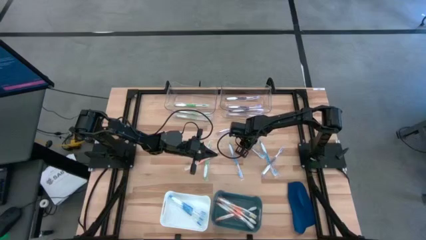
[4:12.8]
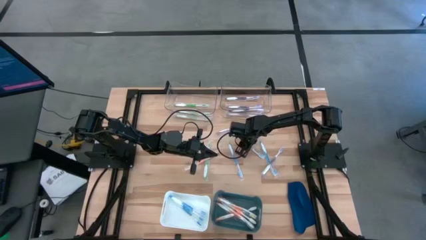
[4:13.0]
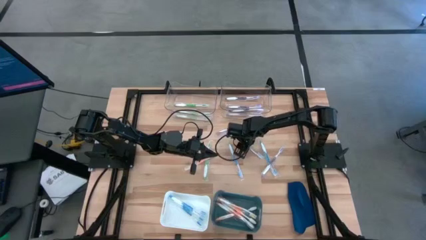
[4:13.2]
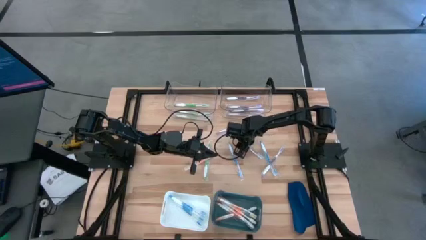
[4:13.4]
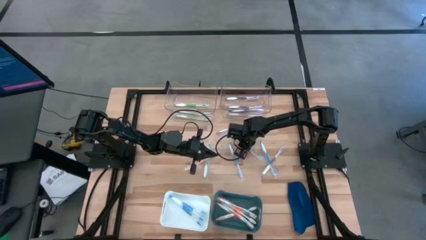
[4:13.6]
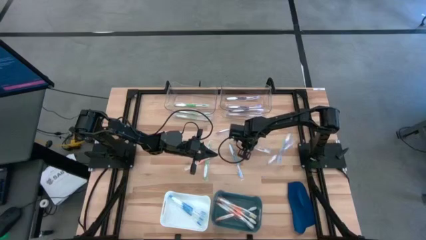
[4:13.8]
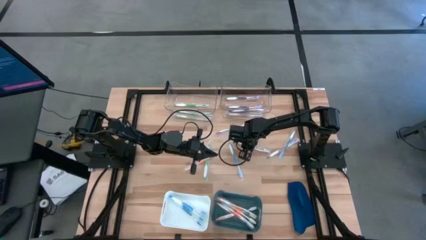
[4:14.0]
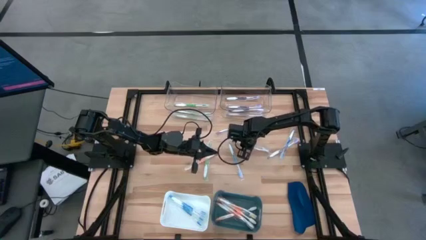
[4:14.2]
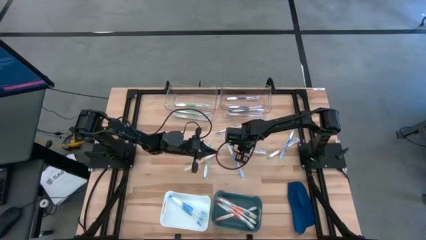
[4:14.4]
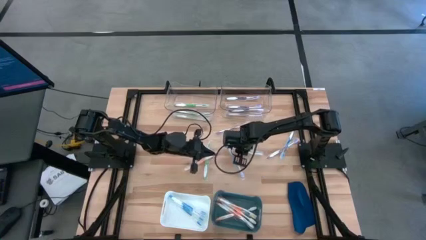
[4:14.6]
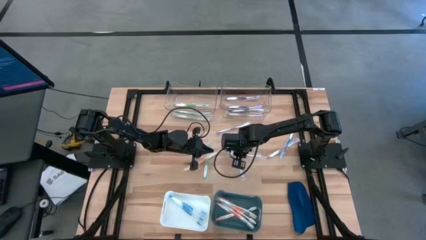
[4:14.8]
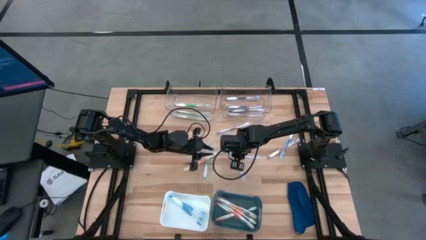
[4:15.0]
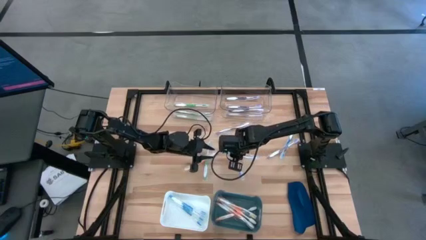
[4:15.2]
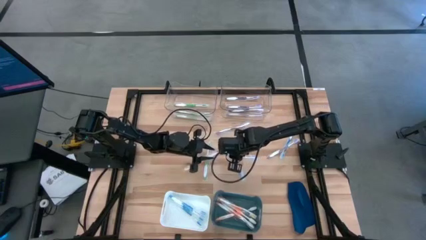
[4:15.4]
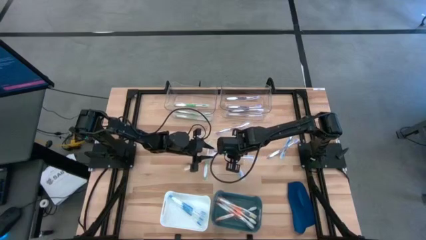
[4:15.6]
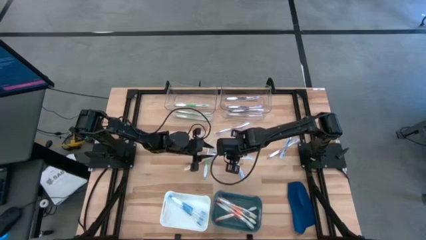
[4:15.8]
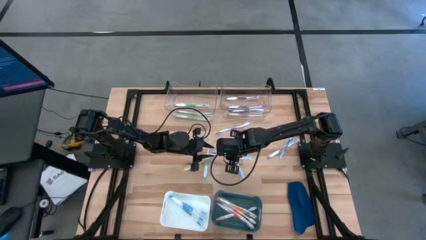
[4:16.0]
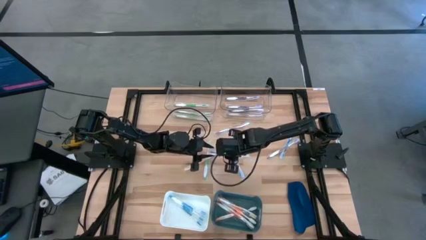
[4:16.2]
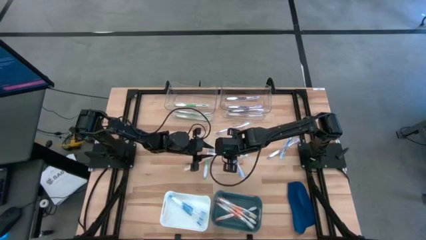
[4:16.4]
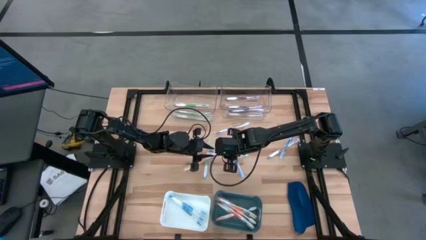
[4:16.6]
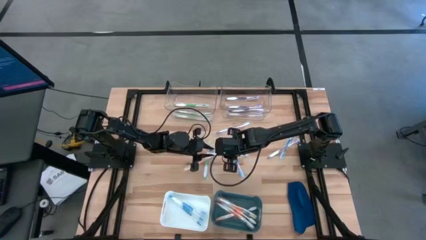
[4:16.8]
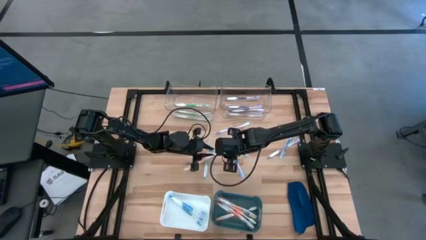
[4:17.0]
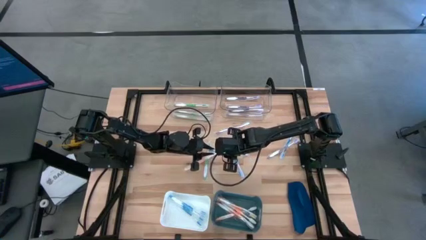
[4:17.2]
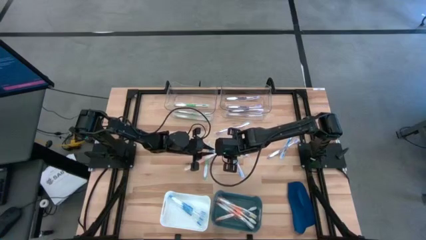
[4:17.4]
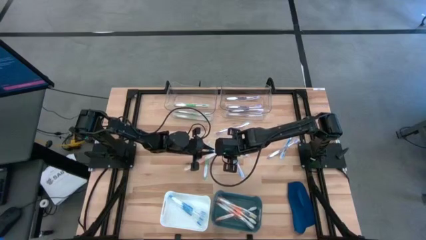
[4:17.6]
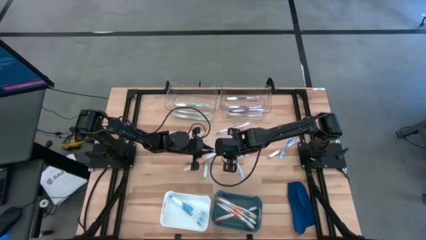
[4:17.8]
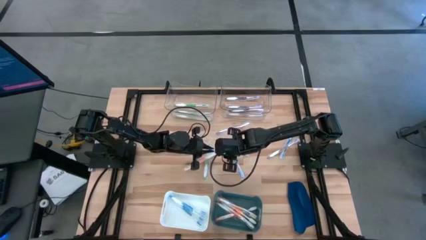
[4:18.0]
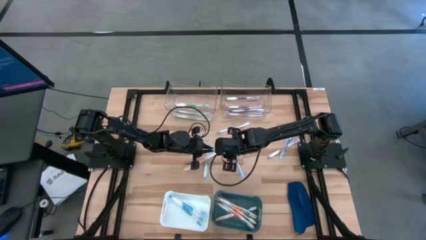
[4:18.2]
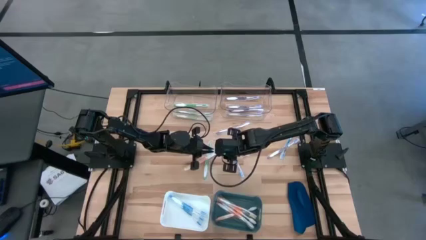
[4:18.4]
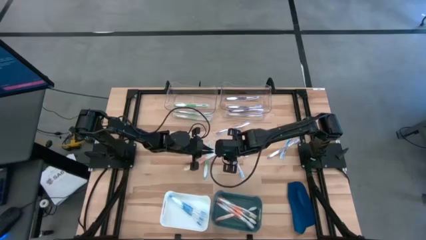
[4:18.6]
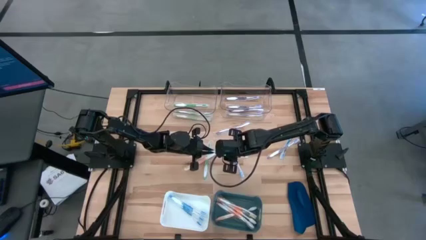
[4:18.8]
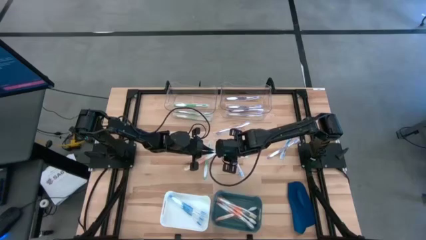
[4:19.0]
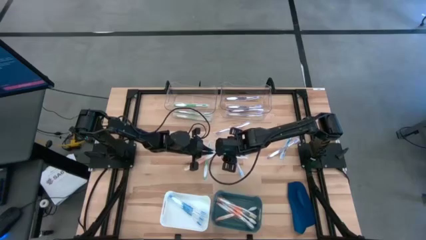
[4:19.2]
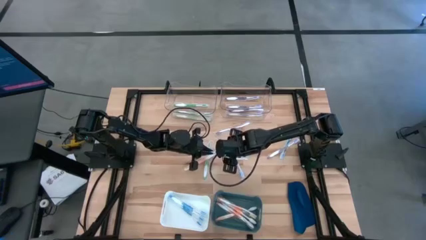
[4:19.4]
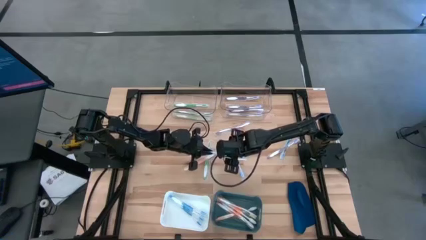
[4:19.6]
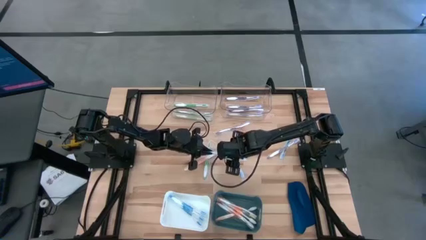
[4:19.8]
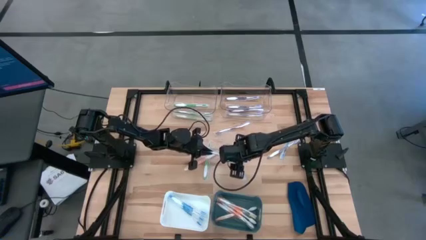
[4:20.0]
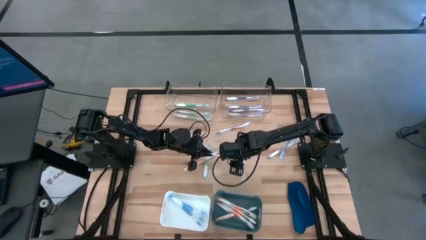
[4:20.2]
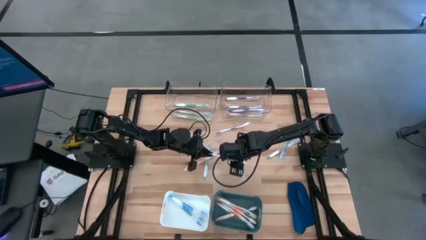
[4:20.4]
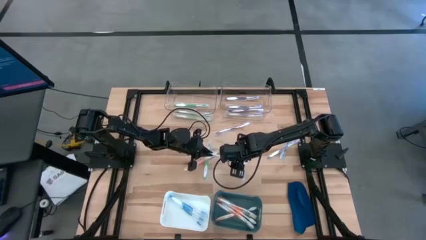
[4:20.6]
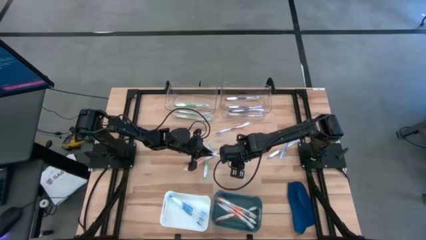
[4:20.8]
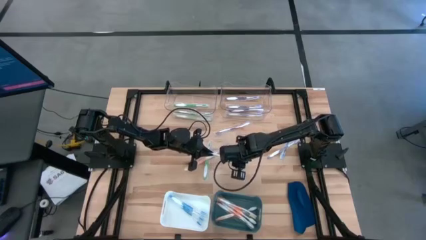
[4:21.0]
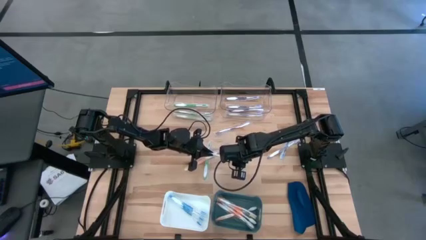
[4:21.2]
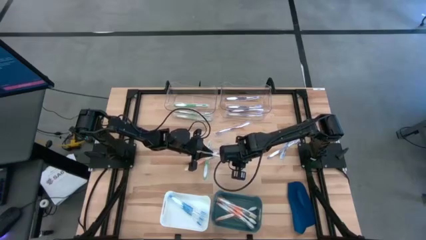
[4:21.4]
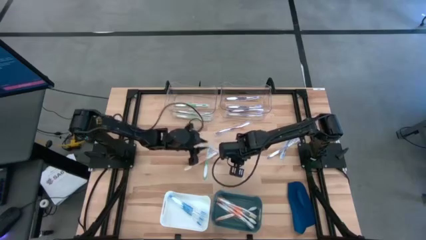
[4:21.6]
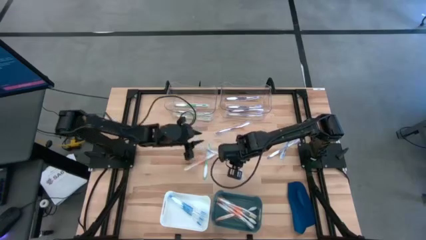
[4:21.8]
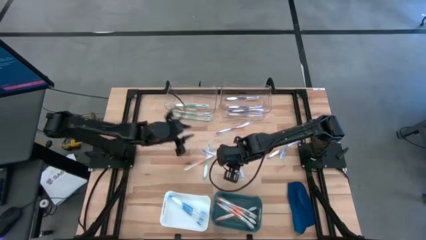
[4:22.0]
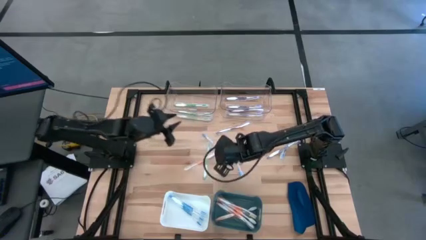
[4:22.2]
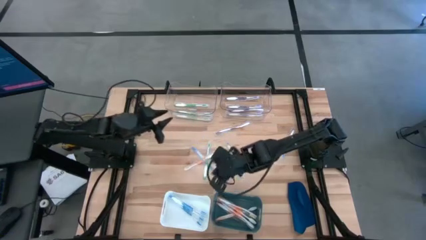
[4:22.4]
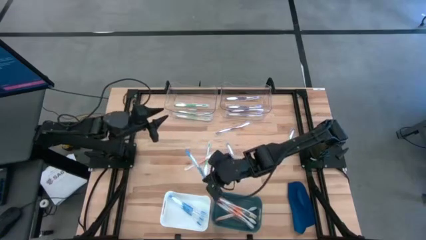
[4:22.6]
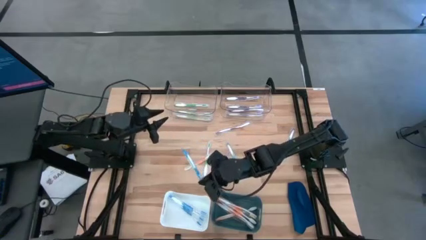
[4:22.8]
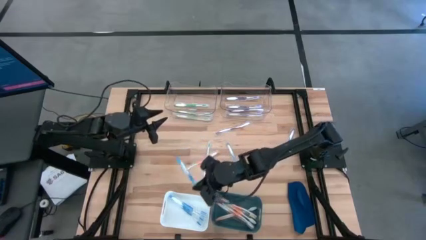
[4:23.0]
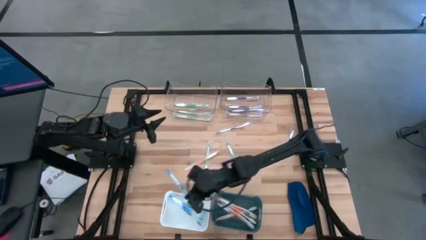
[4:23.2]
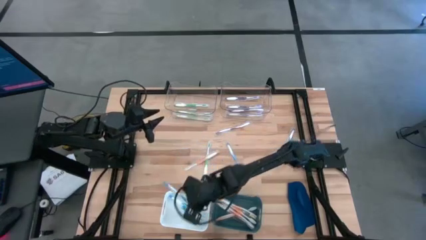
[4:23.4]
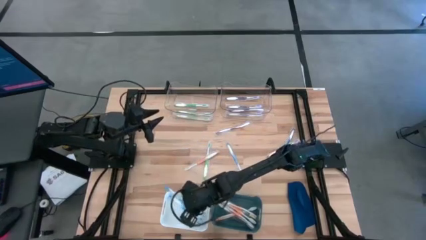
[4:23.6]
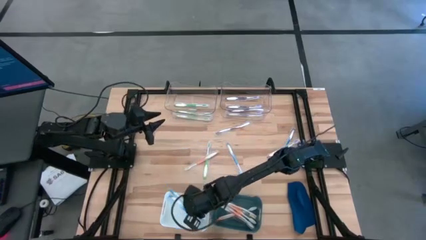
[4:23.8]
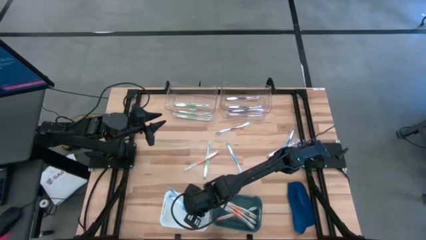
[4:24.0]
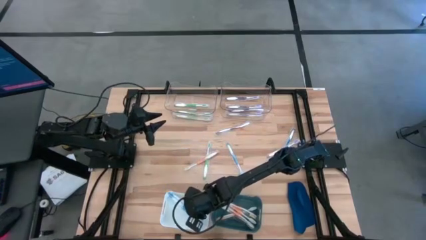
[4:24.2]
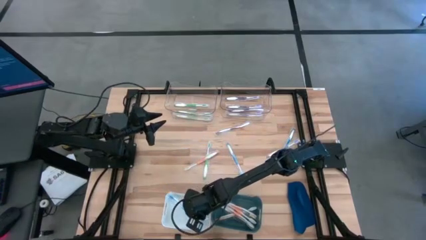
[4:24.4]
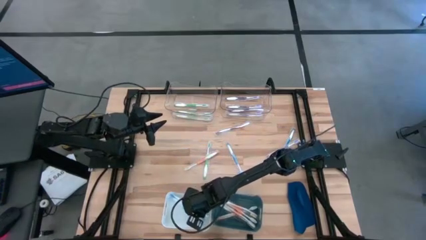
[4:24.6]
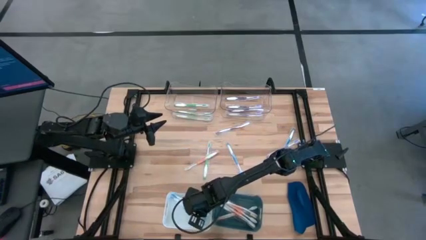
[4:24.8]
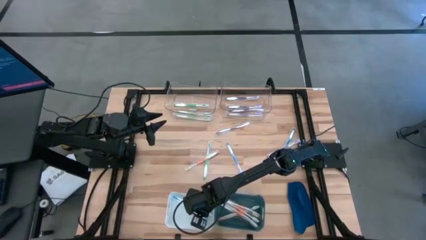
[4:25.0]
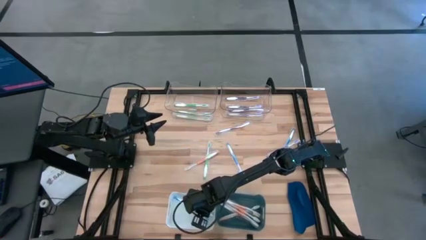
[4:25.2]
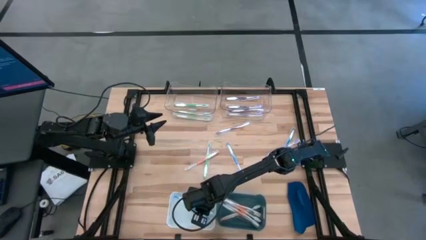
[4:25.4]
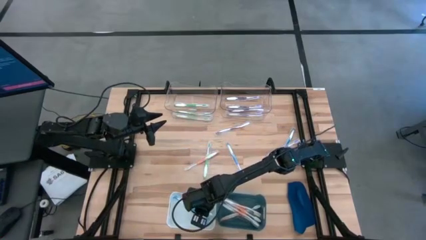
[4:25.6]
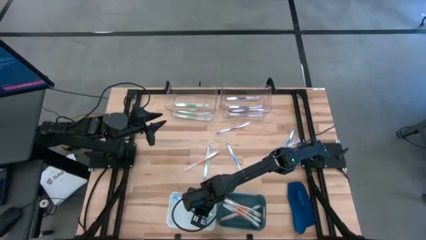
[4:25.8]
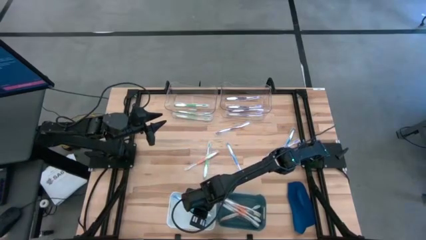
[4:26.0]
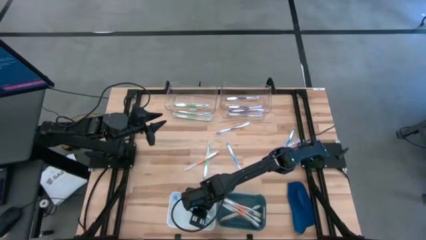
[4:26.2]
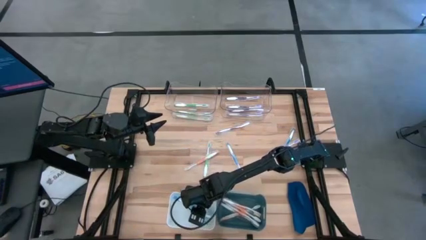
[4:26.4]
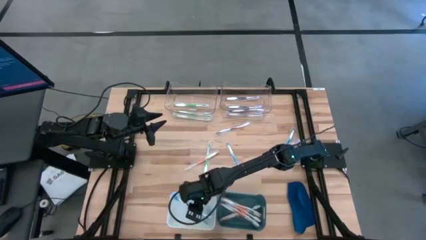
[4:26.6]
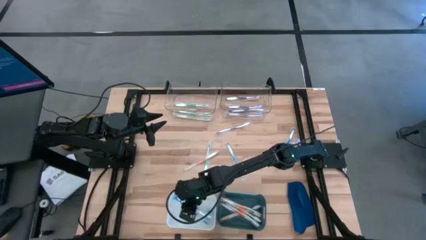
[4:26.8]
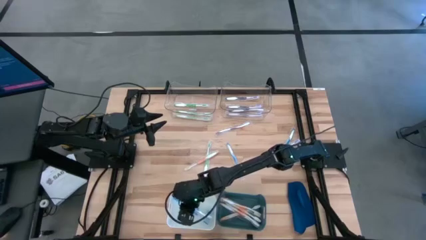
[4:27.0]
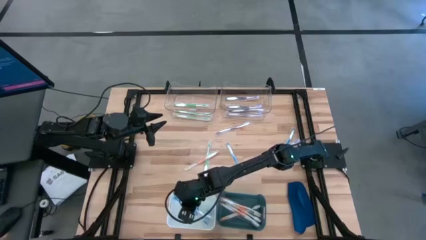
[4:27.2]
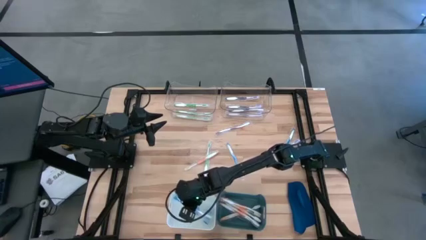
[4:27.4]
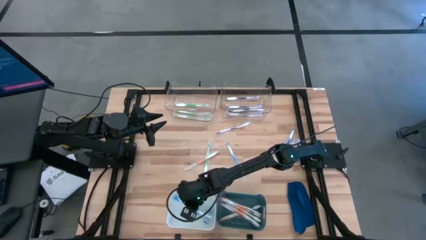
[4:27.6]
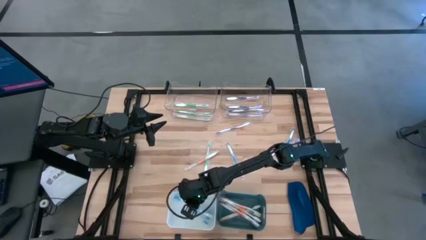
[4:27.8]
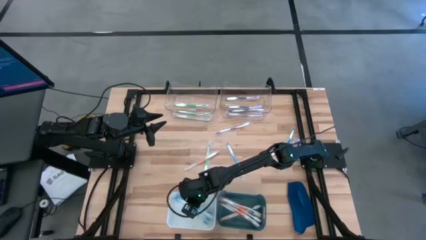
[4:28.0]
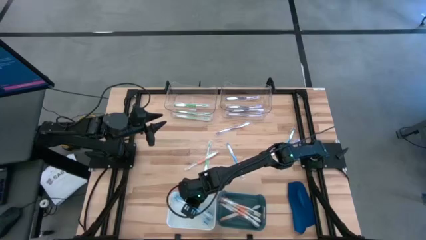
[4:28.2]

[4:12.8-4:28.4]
Task: Pick & Place Toothbrushes
Put the blue toothbrush into the white bin

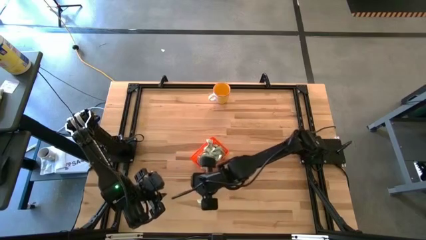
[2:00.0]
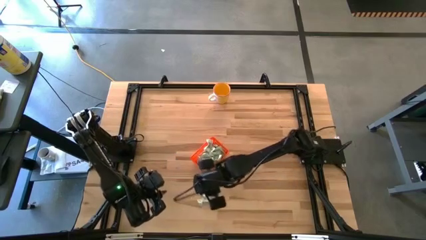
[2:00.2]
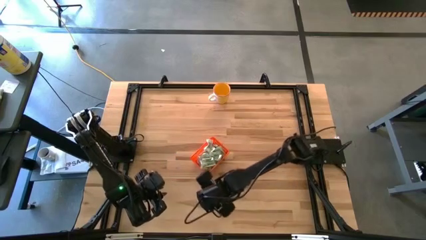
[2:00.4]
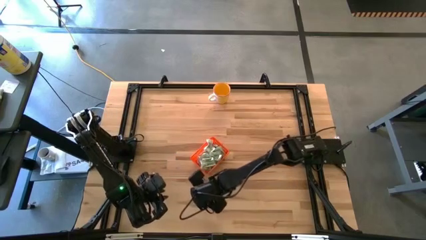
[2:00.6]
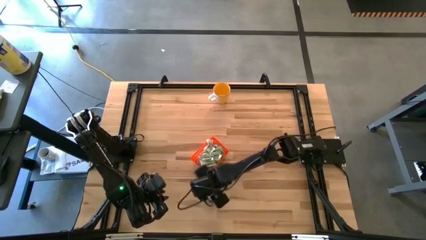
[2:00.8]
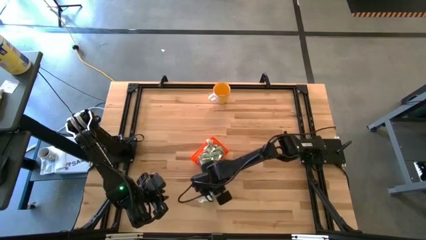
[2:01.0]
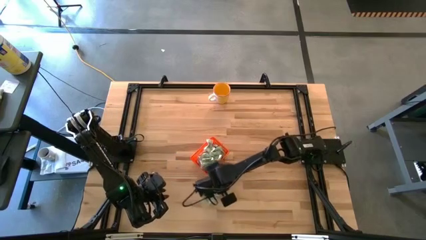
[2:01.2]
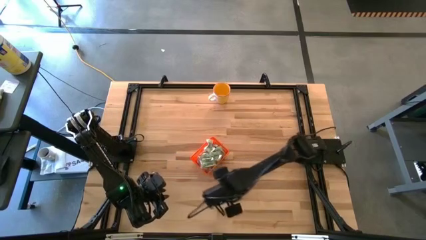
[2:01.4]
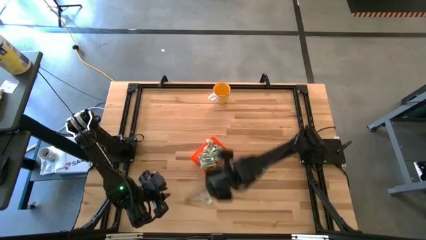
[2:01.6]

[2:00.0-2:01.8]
Task: Pick and place Stevia / Truvia into bins
Put the stevia packet into the bin

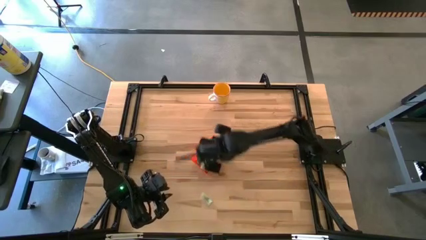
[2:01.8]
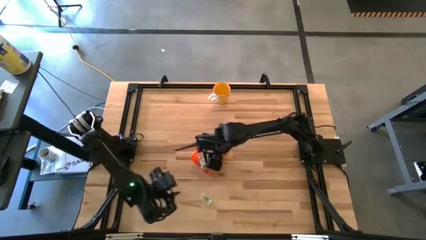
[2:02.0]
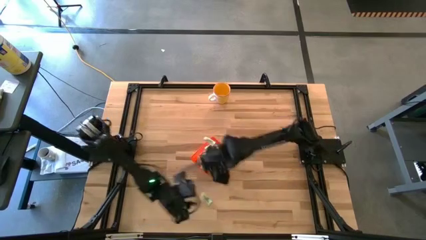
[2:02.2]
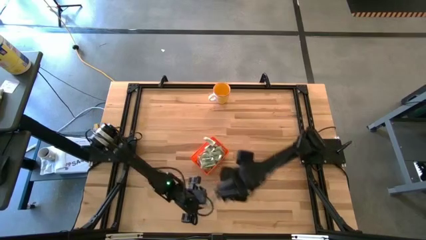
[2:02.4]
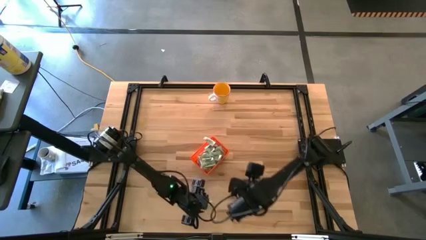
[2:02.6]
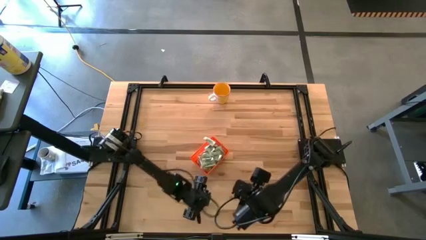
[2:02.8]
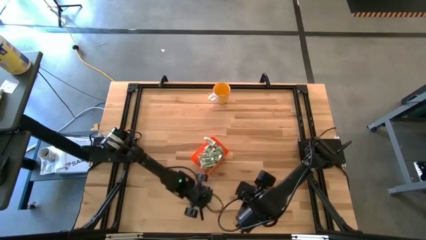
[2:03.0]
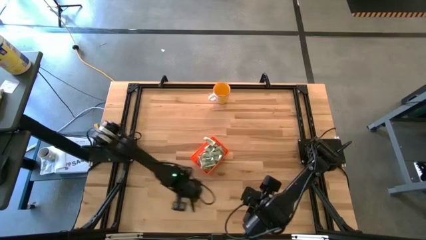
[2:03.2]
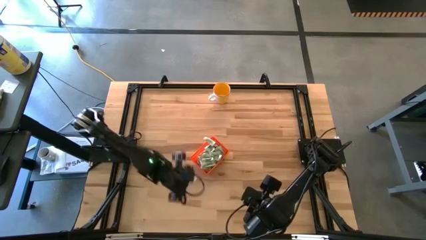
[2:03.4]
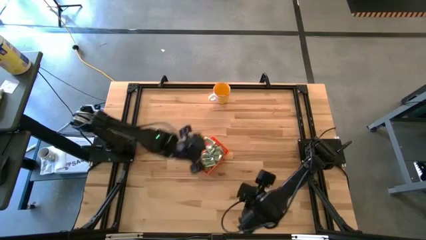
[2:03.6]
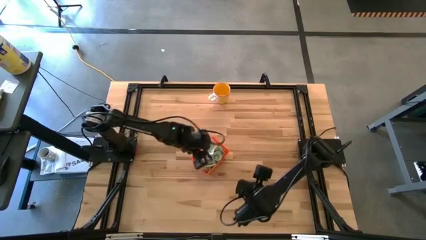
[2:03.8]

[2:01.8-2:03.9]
Put the stevia packet into the bin
